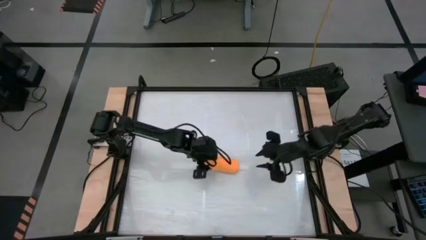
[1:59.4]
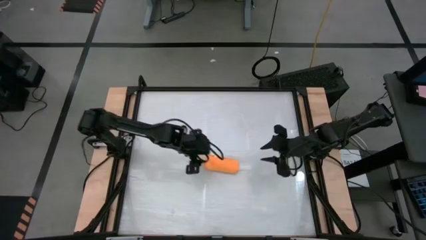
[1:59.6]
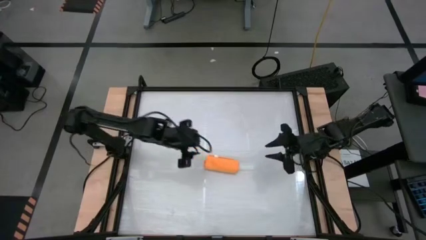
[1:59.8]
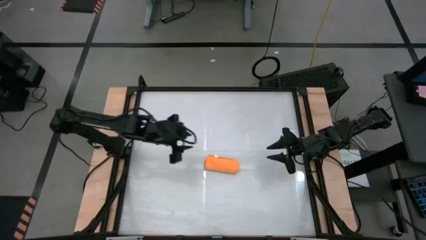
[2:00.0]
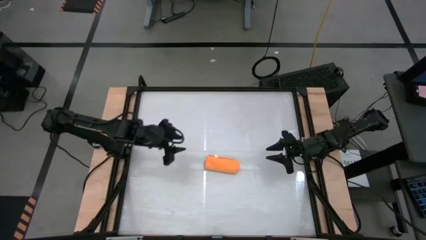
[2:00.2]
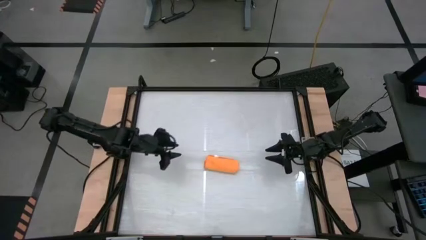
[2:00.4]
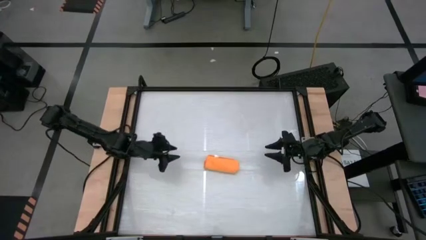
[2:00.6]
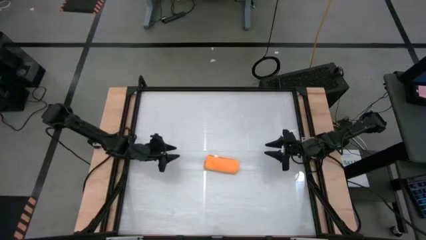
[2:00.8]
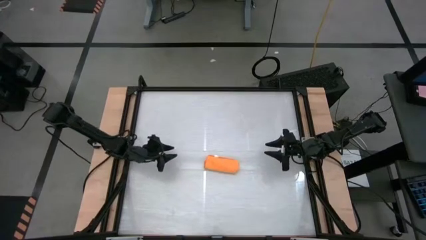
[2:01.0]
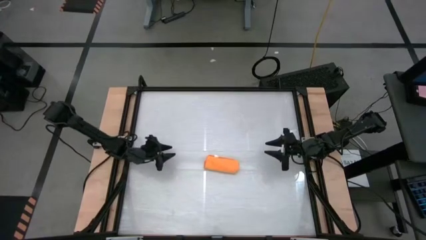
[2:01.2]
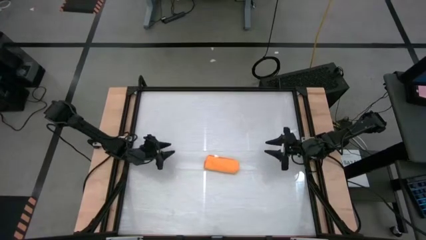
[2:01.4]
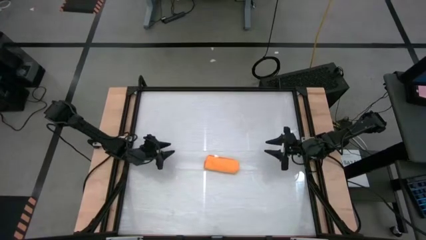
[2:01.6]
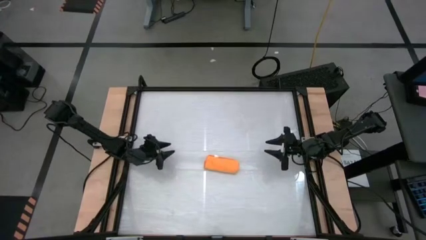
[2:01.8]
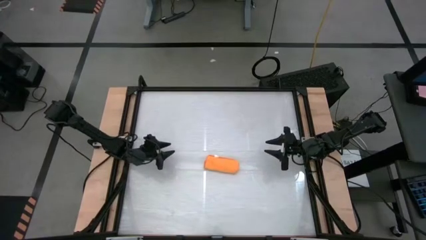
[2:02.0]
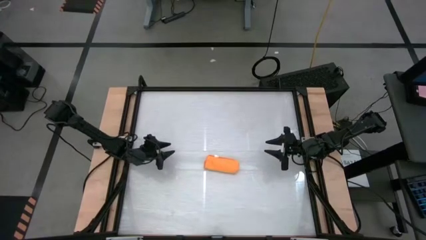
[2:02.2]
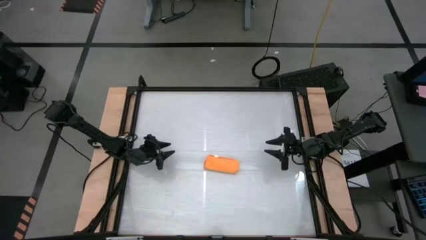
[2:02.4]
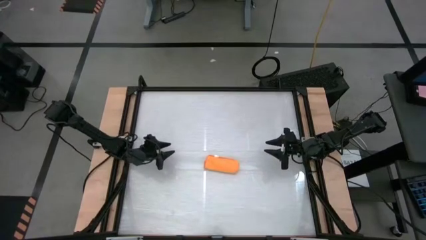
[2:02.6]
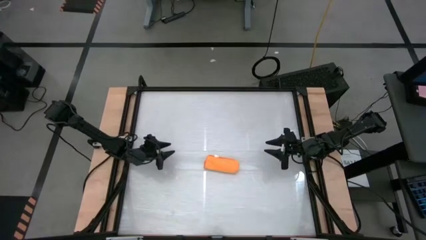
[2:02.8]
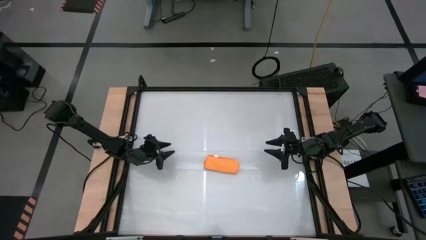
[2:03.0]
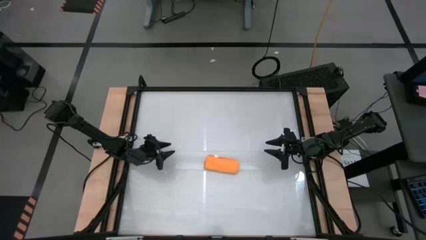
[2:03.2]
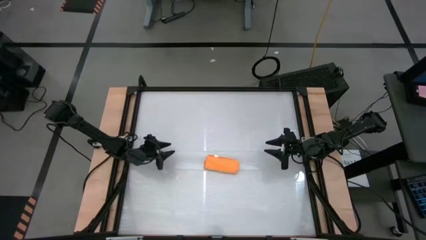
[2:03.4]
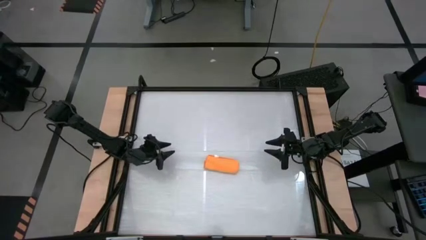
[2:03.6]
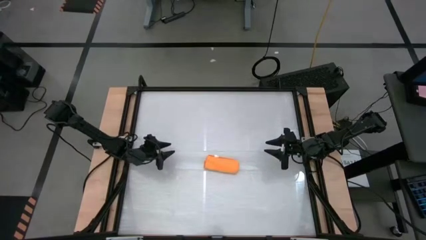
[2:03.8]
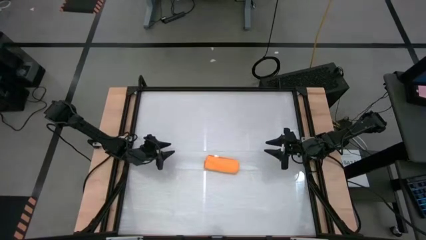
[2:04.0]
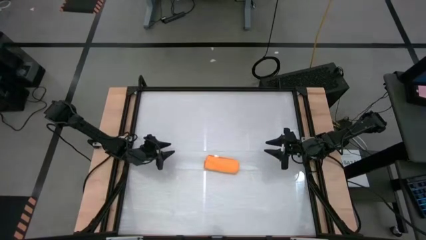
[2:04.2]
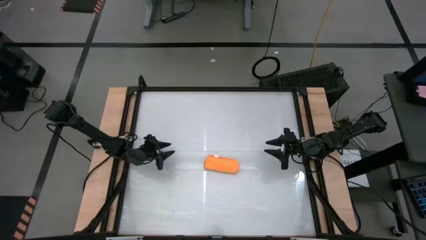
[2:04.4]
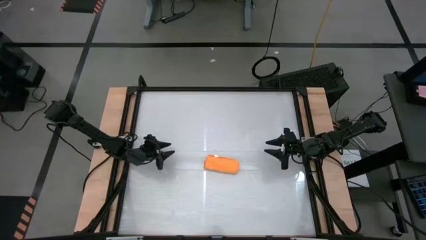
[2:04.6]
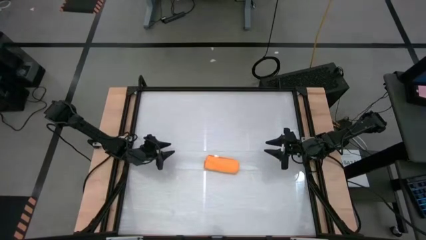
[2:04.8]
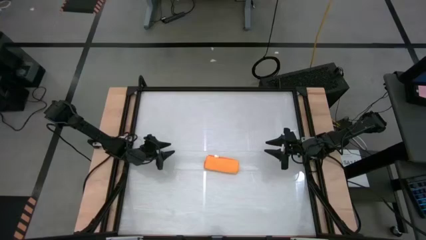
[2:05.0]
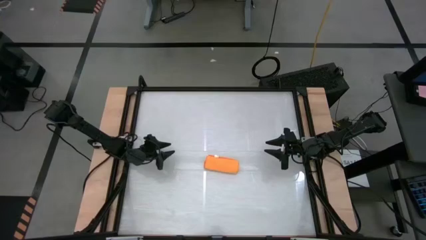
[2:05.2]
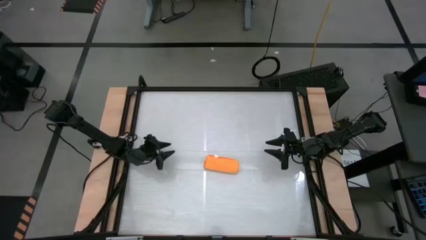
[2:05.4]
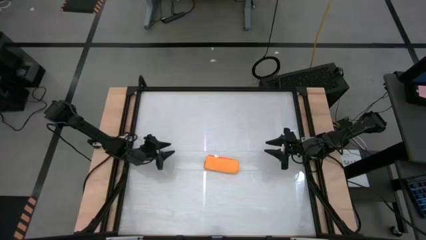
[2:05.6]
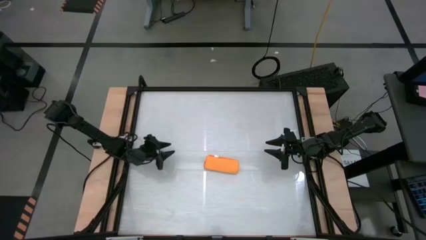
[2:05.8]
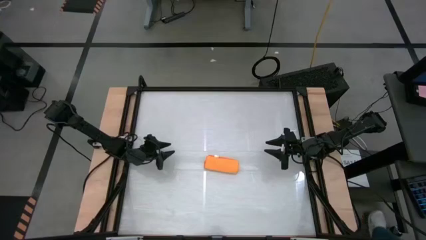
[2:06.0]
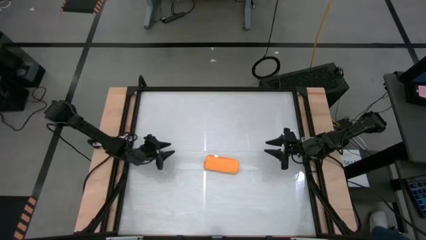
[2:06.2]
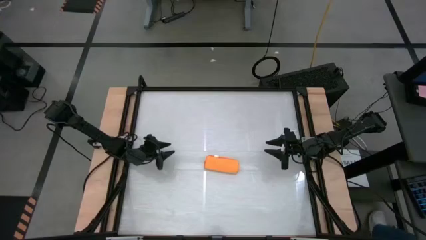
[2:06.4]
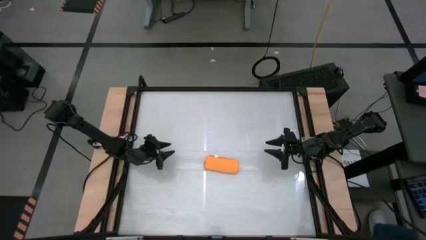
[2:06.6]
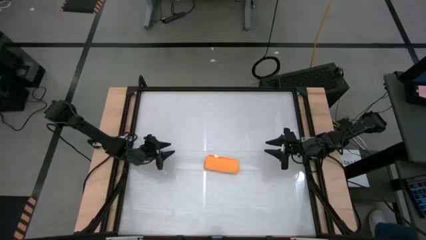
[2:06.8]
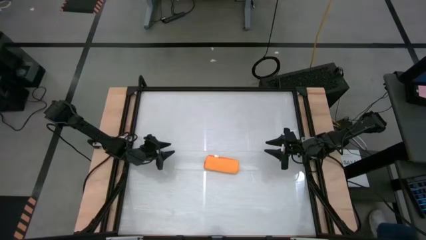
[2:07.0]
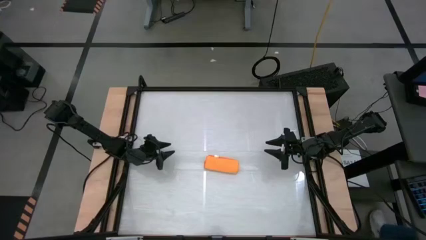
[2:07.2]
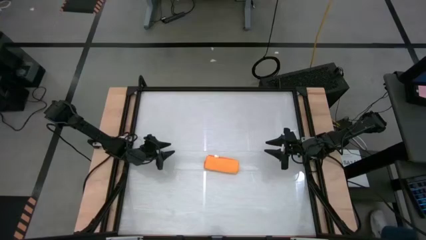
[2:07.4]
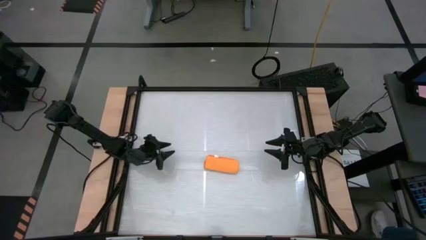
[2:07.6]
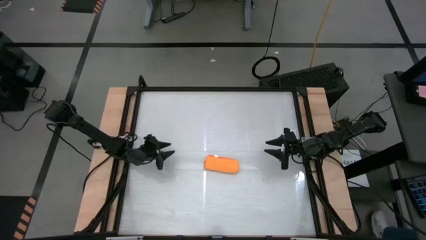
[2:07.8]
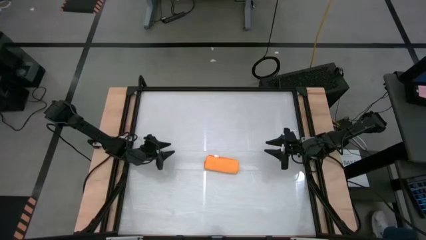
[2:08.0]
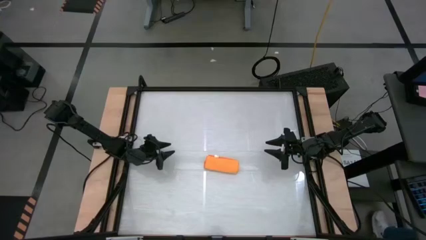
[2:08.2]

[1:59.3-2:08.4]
Task: Roll towel
Return to Home Position

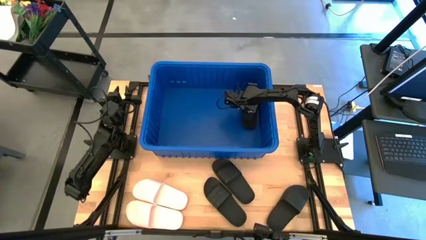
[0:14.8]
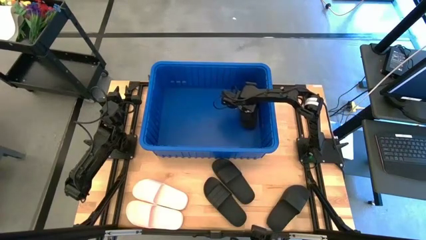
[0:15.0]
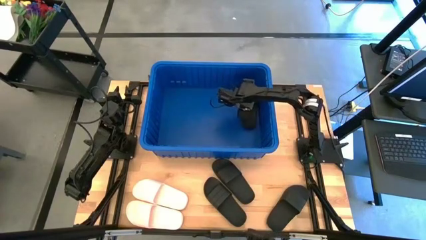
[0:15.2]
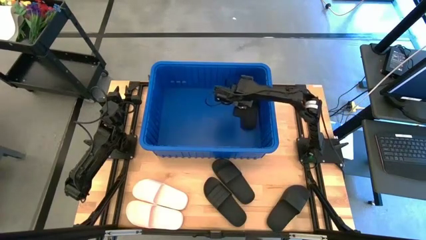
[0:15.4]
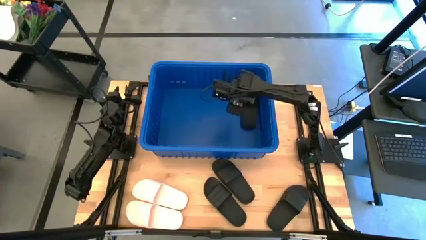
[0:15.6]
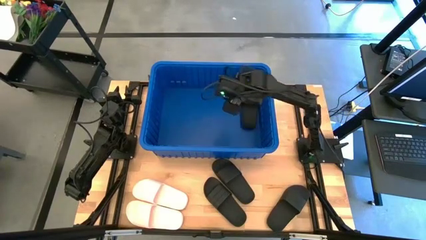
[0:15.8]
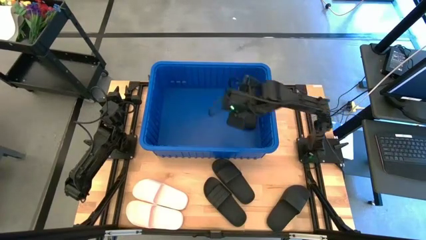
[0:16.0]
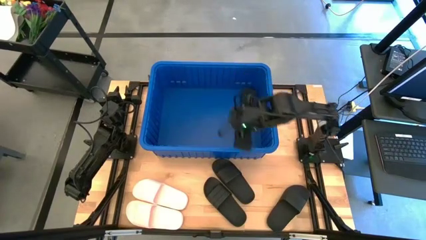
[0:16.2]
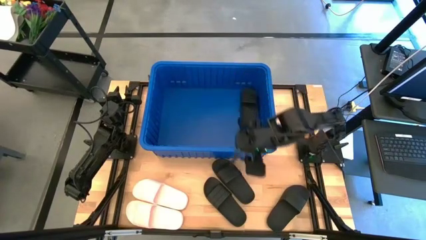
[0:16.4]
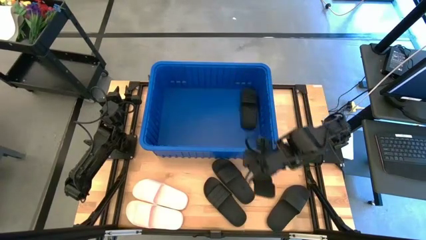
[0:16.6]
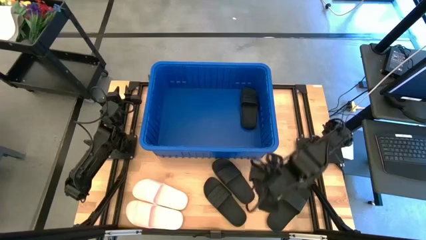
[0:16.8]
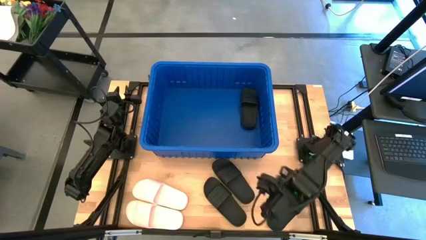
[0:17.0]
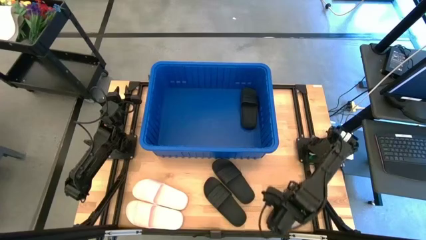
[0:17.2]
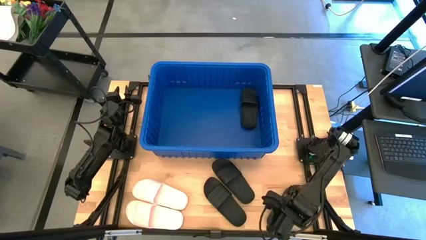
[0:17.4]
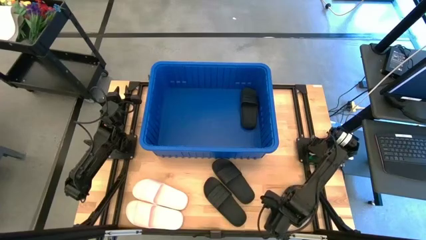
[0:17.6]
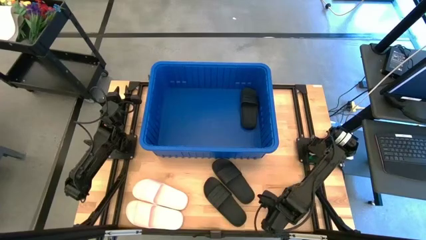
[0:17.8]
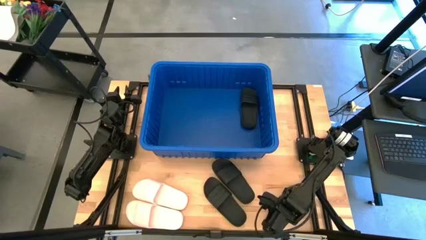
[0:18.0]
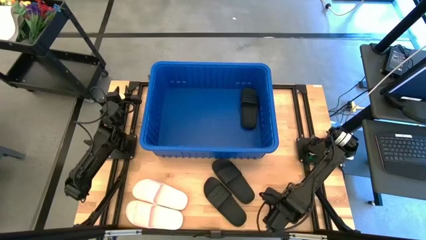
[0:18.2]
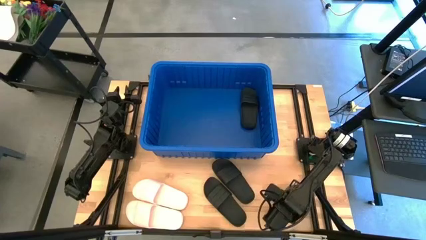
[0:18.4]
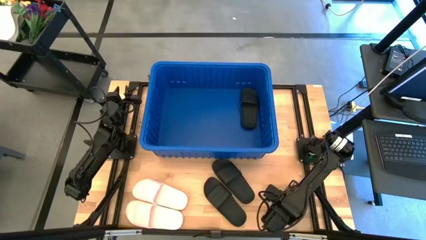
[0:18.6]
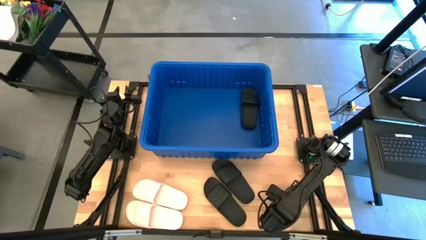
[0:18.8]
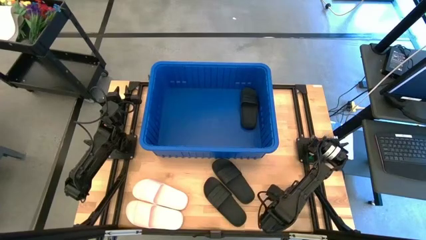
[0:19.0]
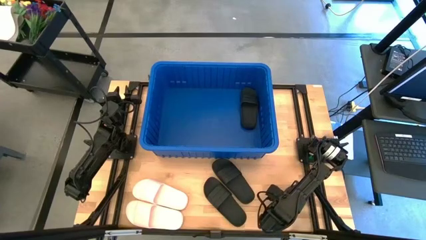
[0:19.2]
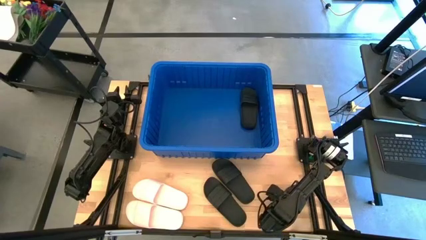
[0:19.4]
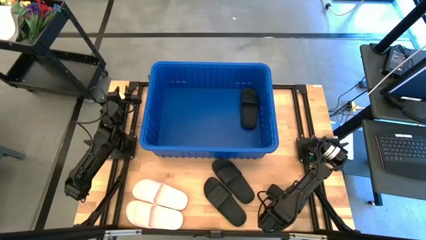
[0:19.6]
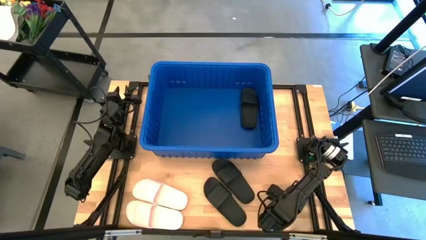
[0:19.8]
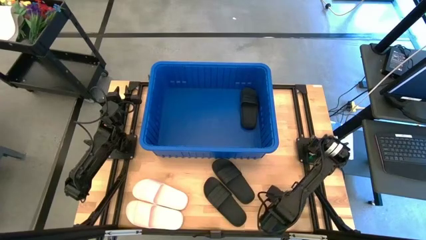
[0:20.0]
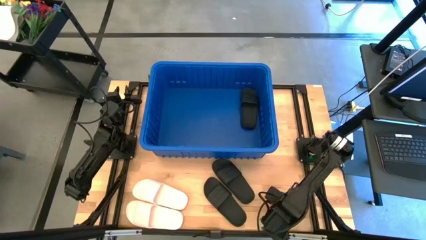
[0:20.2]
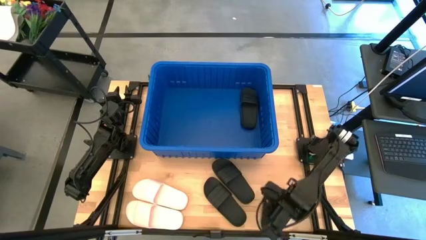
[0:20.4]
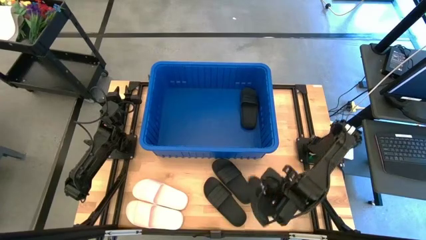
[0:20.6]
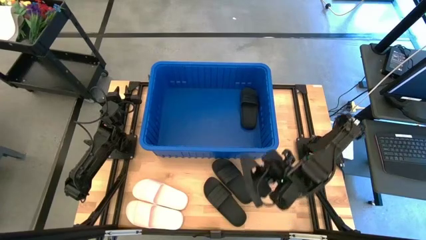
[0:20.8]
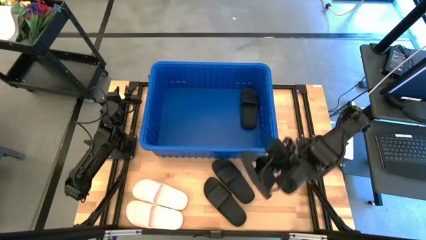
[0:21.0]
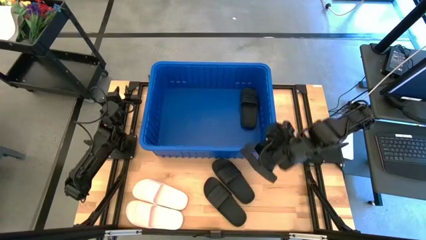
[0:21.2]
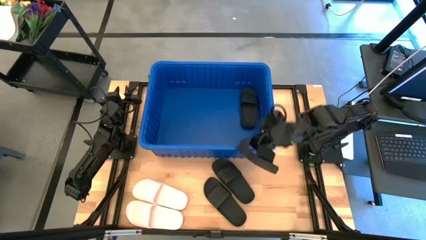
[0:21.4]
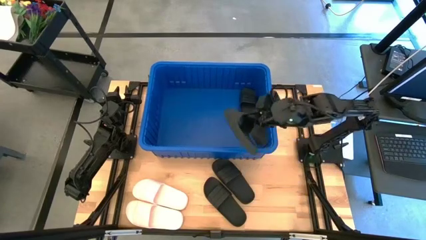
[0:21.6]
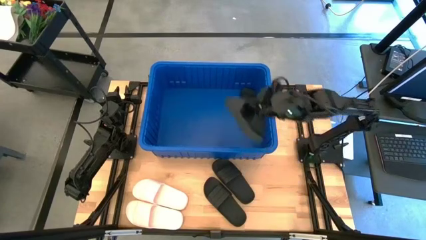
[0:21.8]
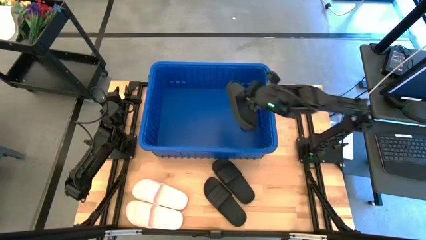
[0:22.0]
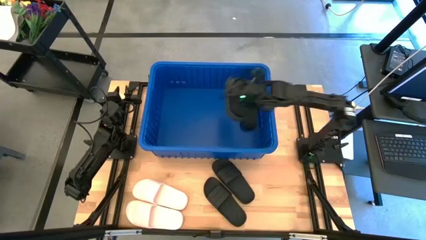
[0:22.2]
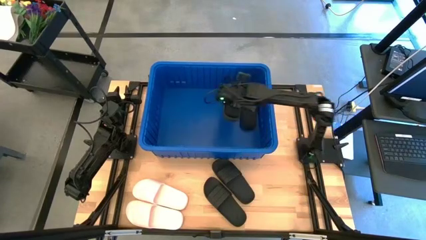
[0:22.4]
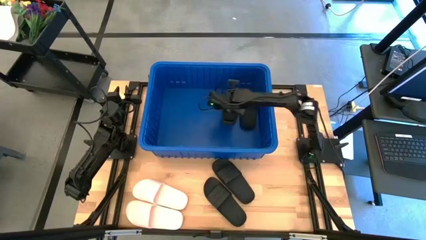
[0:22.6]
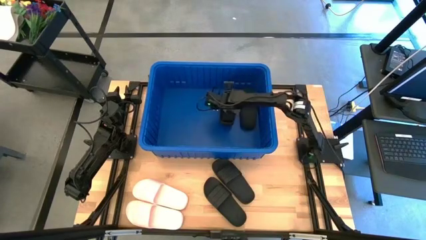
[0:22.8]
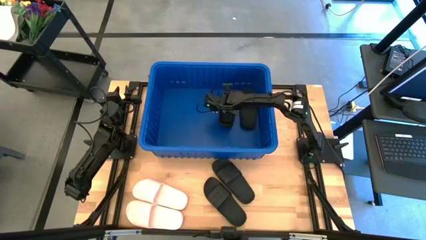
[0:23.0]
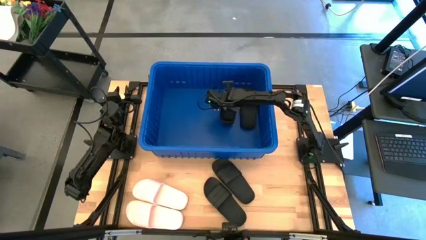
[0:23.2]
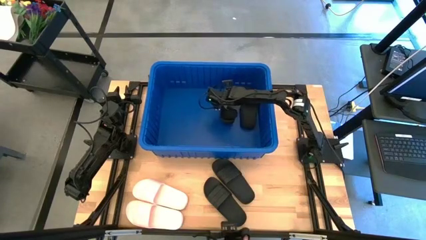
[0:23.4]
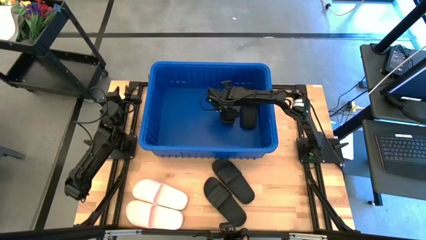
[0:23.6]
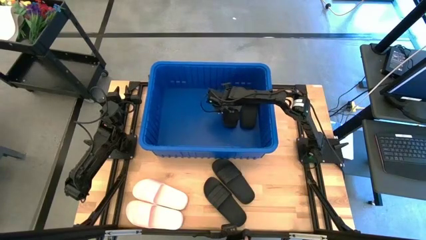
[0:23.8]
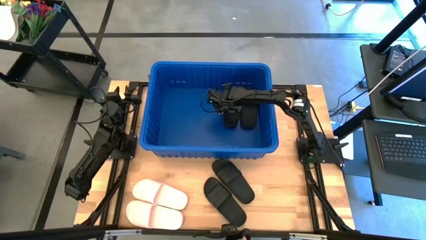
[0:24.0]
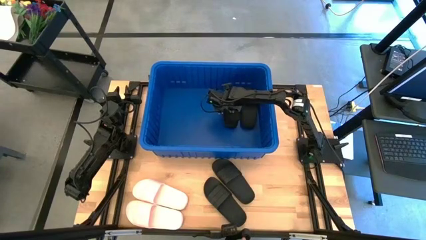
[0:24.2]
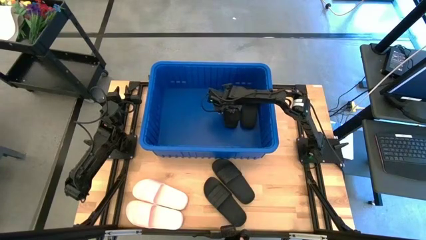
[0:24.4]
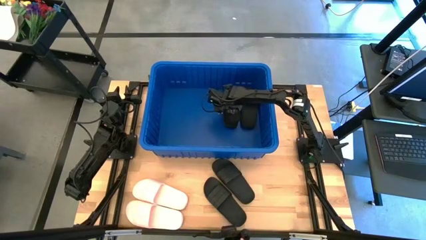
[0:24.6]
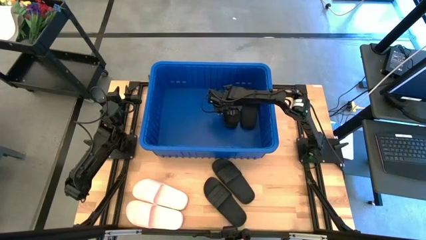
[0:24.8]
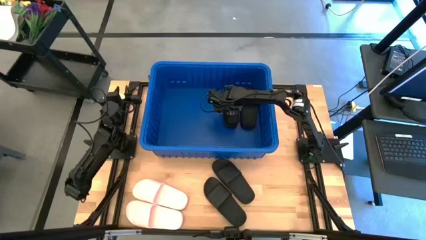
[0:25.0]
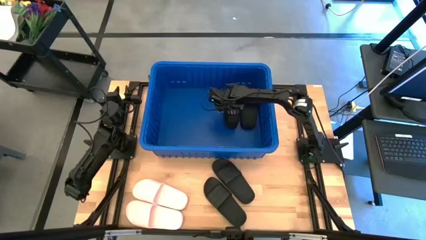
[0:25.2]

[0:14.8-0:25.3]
Task: Pick and place slides into bin
Put the black slide into the blue container
